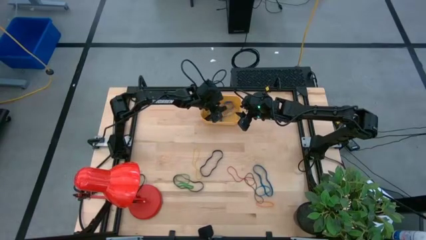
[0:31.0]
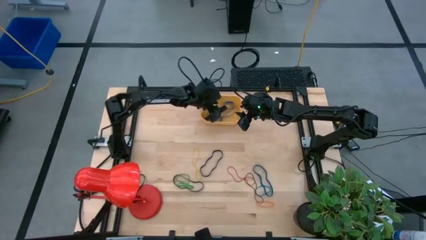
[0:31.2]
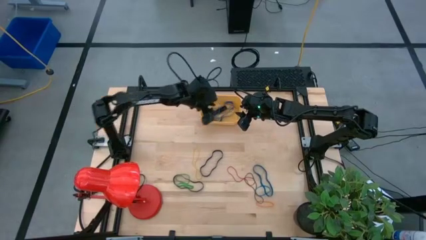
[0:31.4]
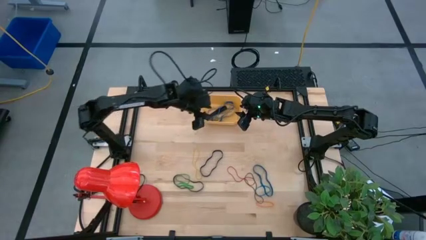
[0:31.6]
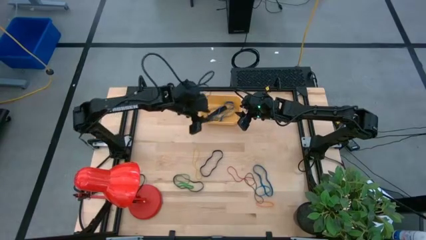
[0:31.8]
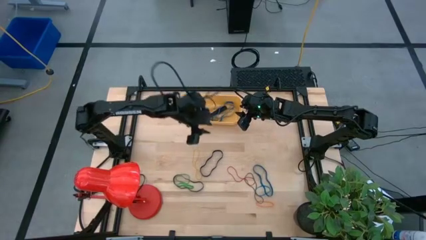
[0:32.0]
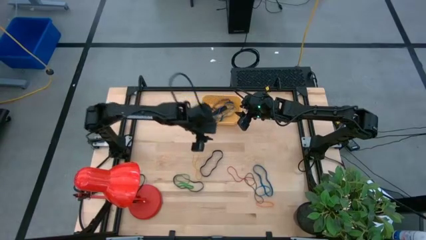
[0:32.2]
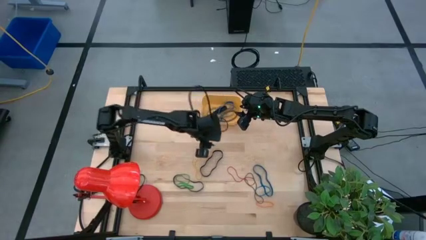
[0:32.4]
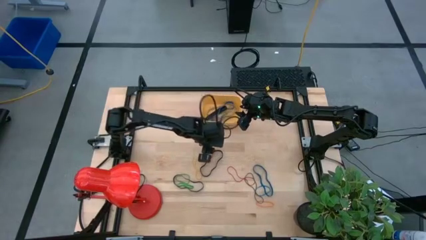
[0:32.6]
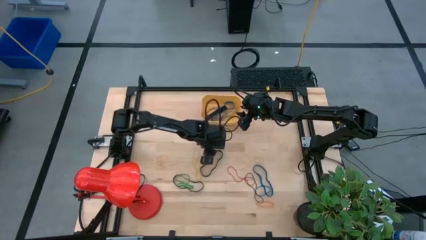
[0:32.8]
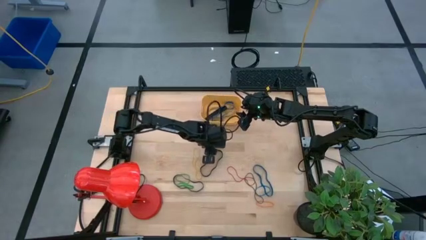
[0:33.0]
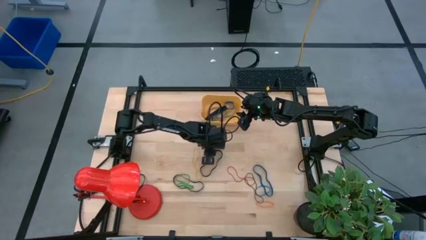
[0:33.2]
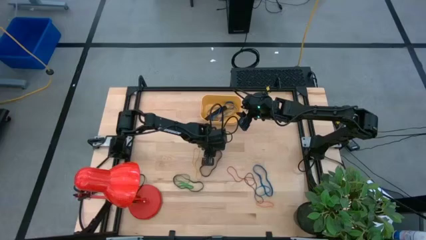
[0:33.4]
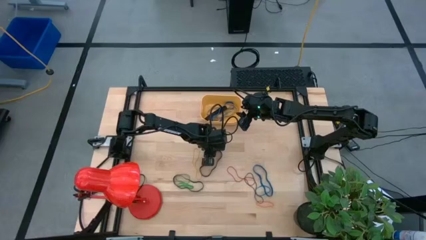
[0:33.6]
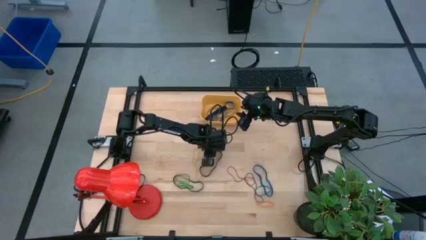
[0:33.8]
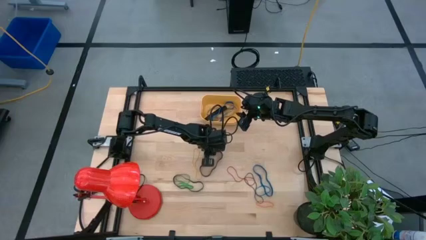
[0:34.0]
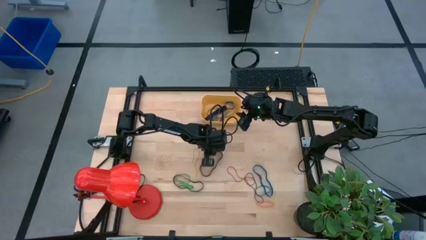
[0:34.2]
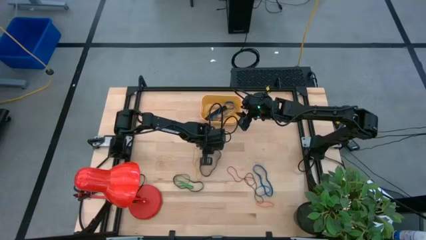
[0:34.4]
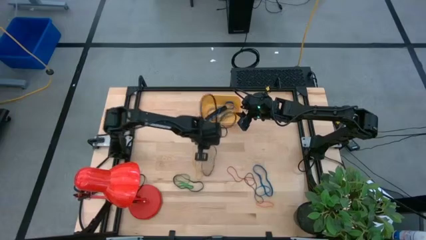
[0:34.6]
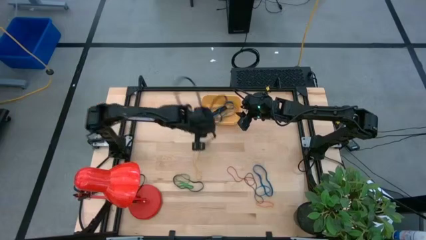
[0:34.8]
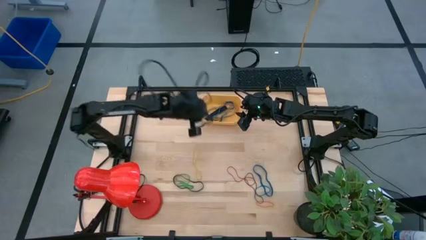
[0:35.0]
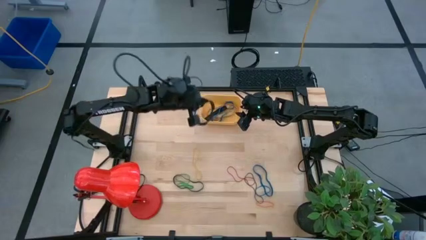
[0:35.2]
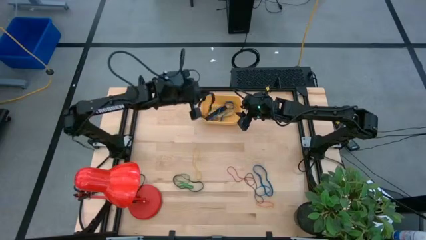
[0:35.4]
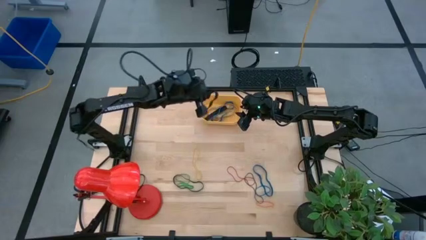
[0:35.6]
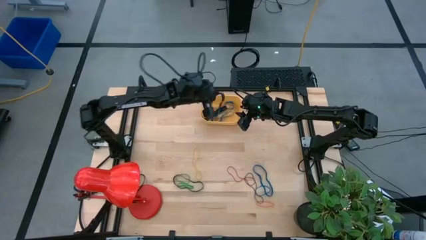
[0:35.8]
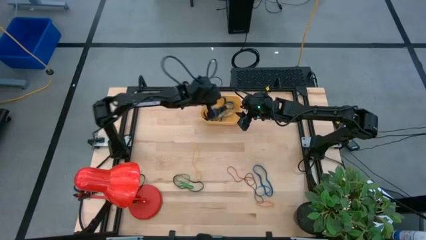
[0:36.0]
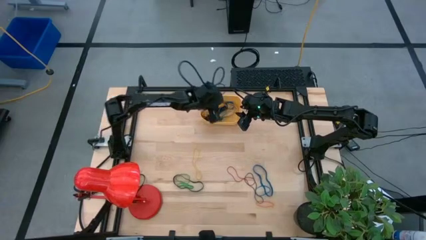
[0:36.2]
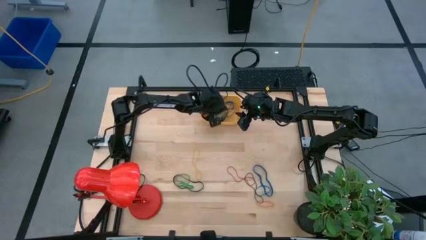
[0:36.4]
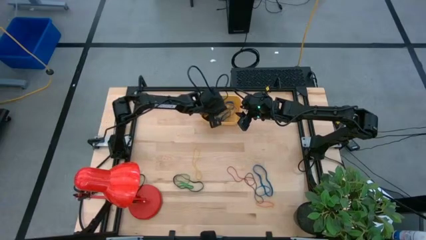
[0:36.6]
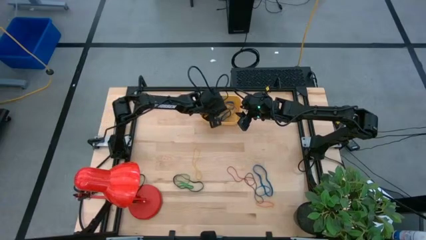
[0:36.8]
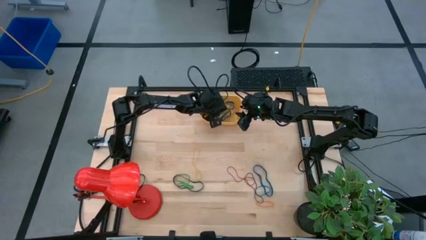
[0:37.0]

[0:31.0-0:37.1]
Task: Pick and place rubber bands into bin
Put the top black rubber band into the yellow bin

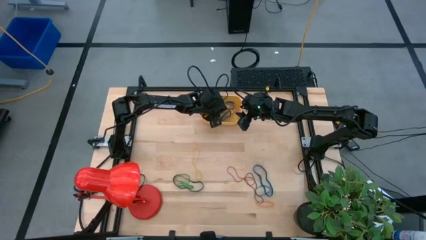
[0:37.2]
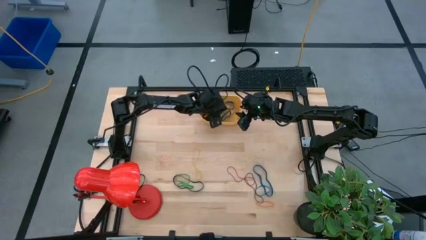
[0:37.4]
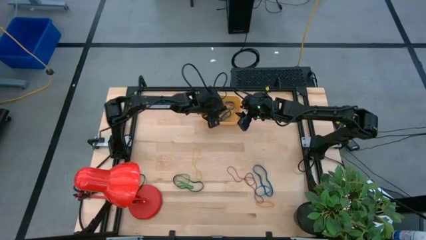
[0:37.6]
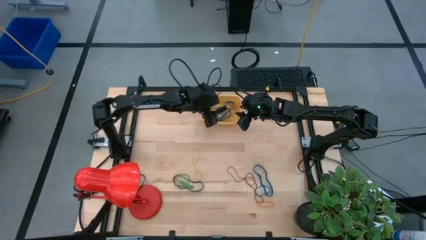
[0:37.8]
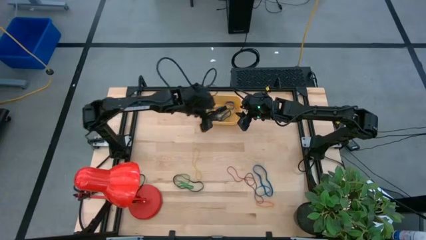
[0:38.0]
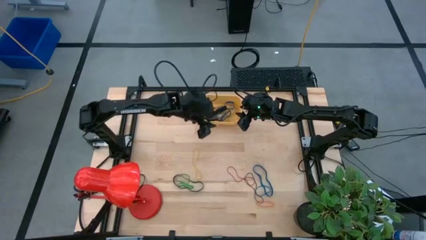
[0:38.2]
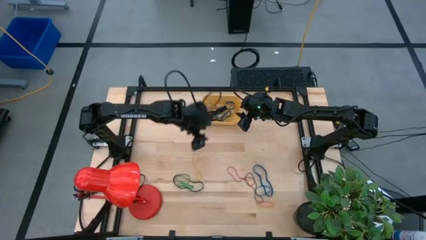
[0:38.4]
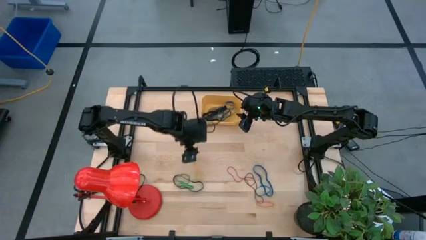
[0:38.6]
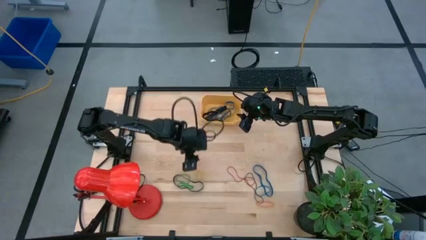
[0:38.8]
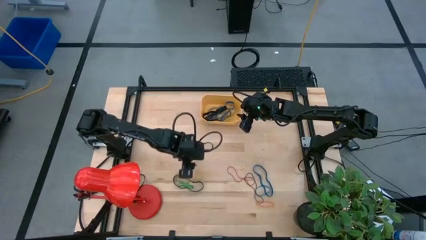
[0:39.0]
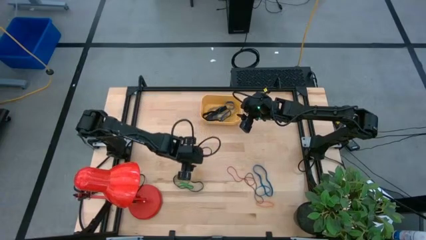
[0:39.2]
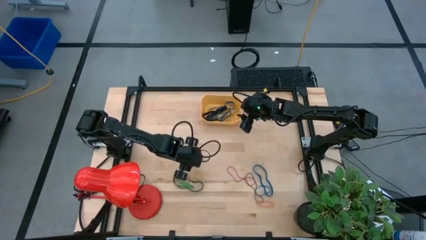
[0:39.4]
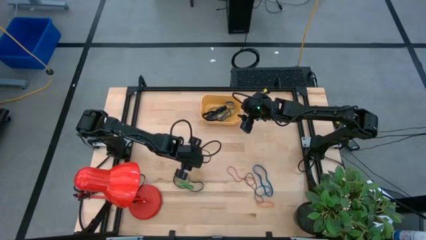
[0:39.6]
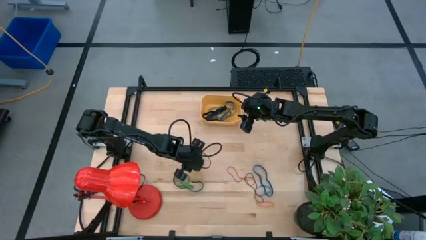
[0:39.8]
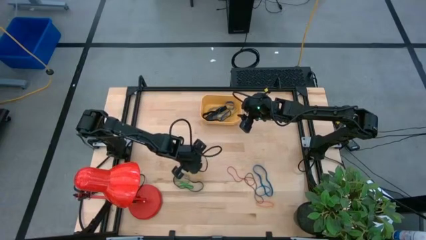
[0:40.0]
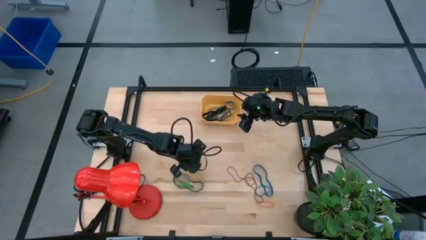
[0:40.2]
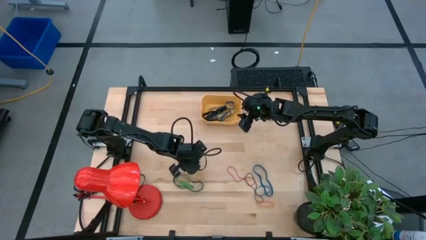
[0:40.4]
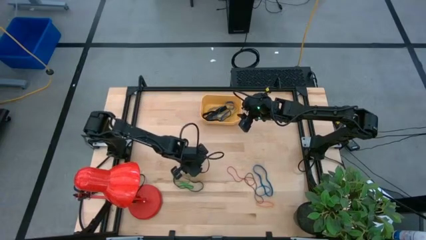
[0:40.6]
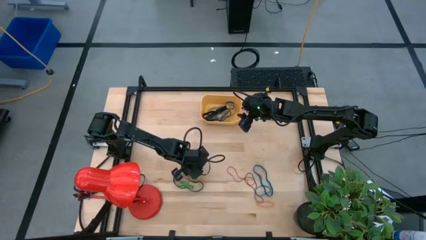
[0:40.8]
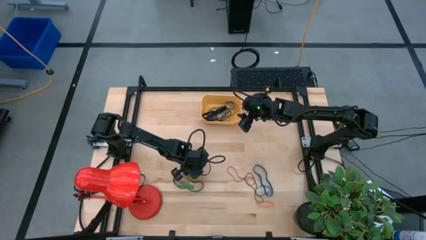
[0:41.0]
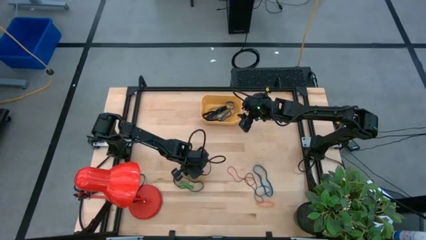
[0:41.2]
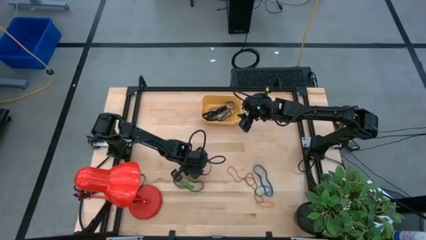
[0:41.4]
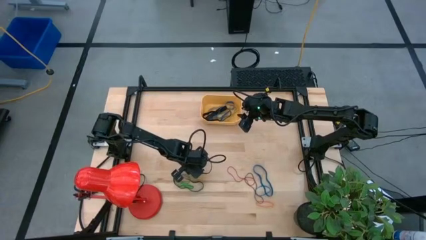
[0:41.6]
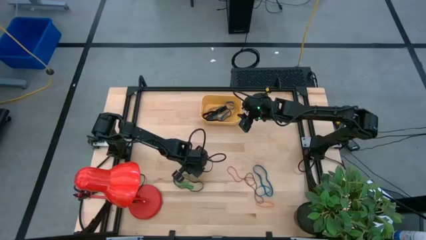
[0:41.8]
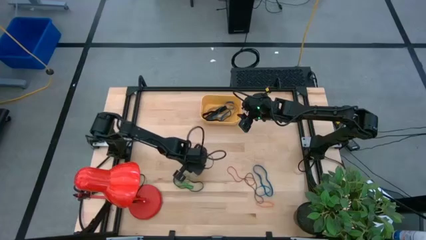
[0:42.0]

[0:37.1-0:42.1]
Put the yellow rubber band into the yellow bin

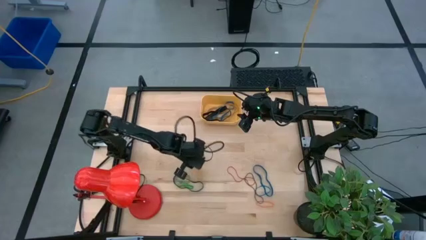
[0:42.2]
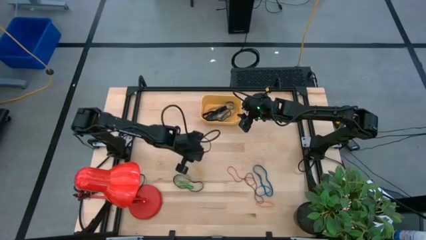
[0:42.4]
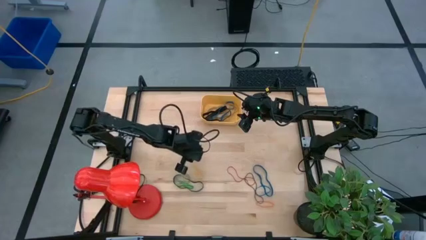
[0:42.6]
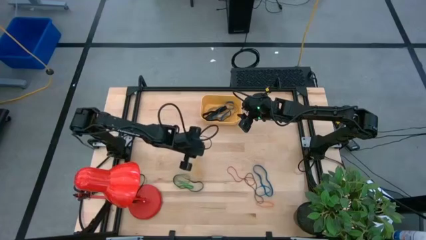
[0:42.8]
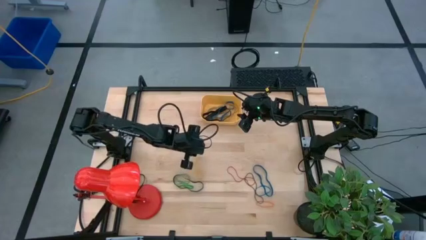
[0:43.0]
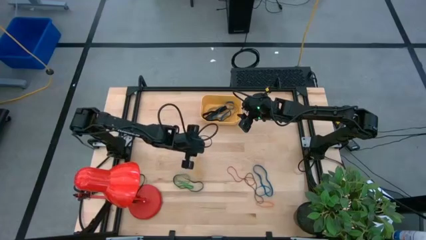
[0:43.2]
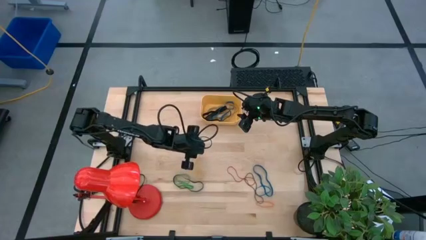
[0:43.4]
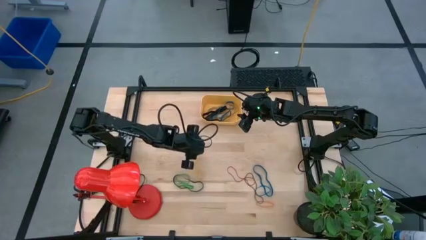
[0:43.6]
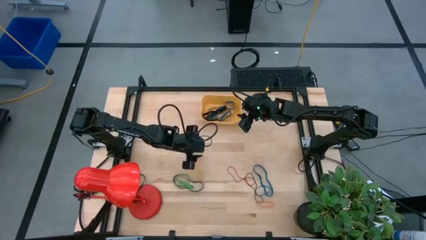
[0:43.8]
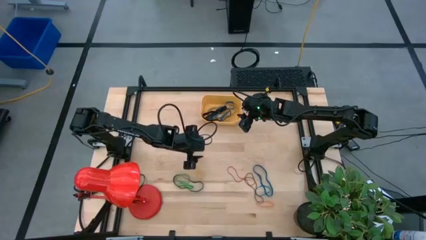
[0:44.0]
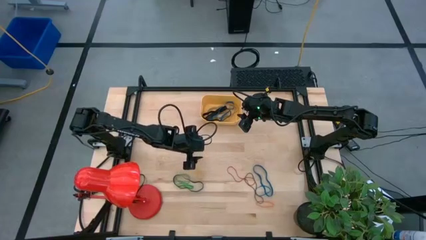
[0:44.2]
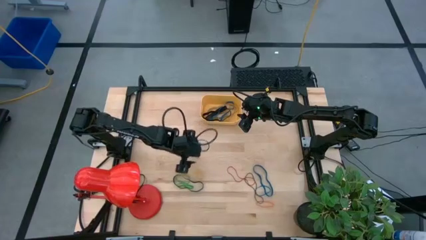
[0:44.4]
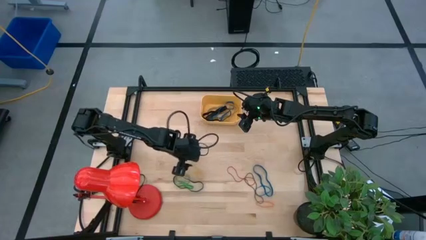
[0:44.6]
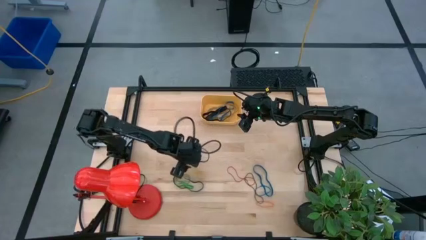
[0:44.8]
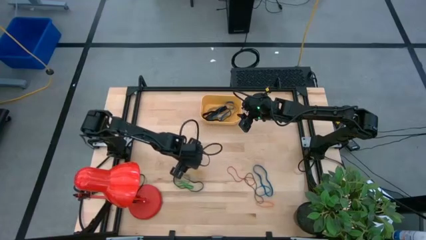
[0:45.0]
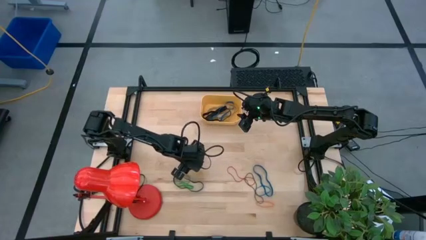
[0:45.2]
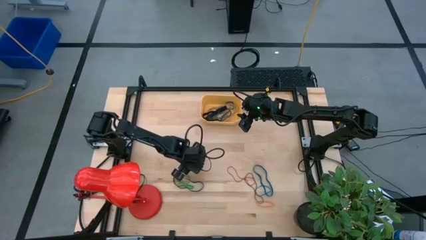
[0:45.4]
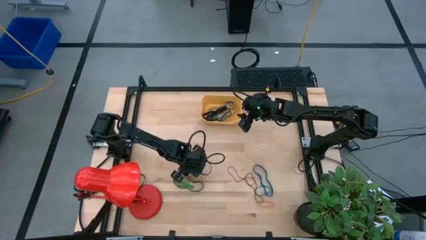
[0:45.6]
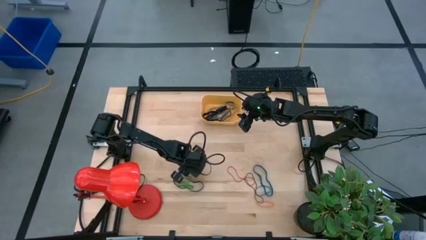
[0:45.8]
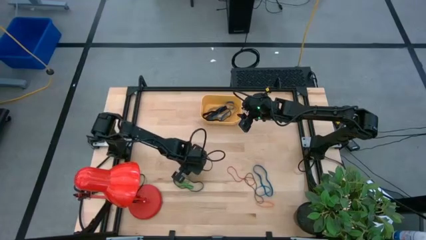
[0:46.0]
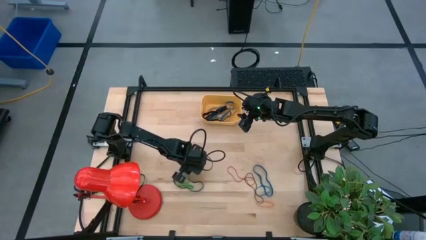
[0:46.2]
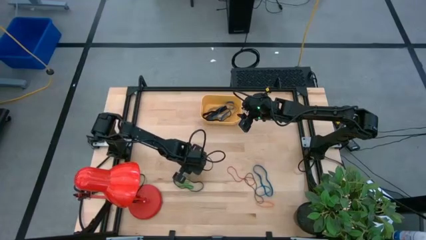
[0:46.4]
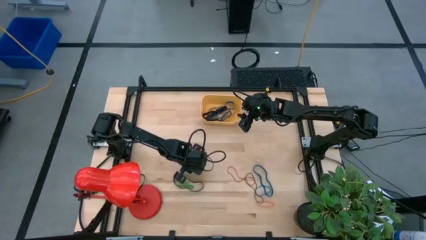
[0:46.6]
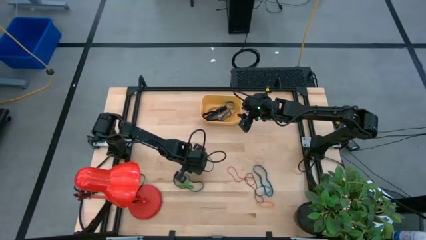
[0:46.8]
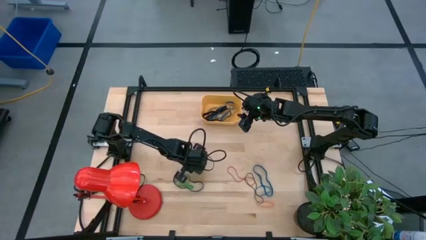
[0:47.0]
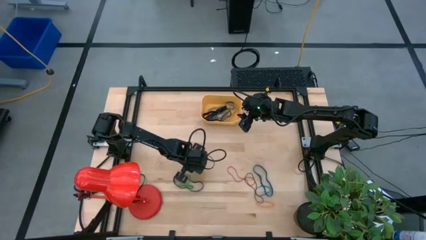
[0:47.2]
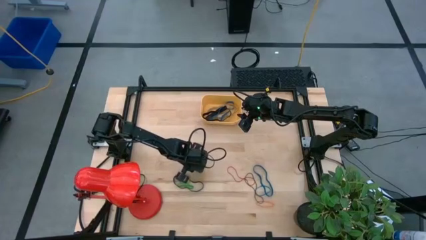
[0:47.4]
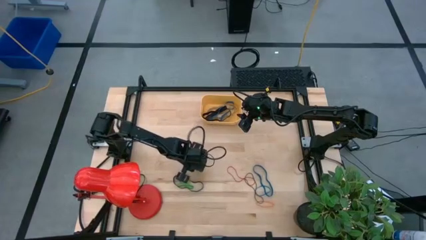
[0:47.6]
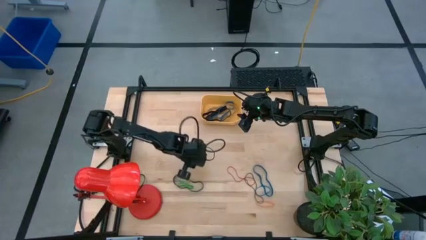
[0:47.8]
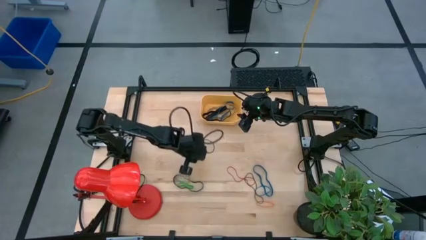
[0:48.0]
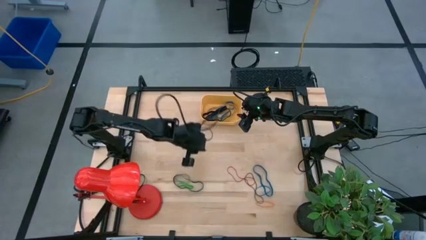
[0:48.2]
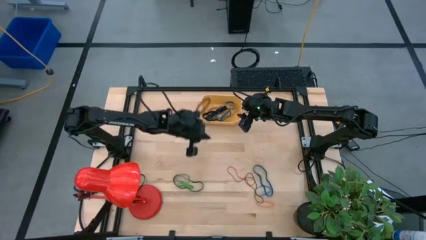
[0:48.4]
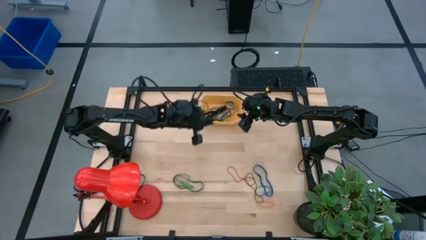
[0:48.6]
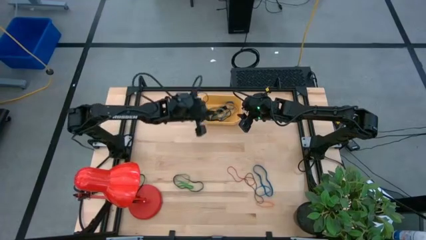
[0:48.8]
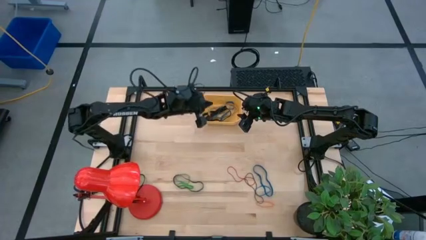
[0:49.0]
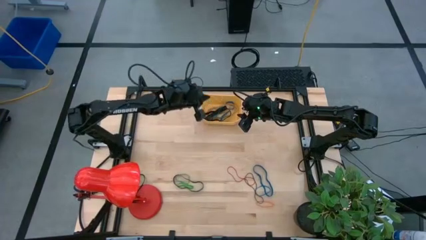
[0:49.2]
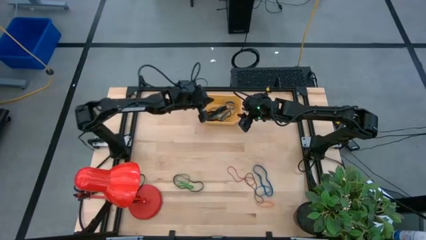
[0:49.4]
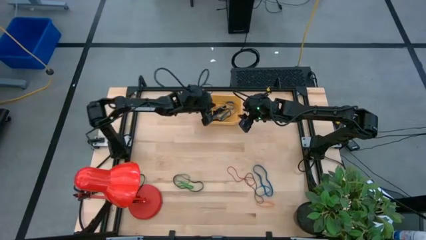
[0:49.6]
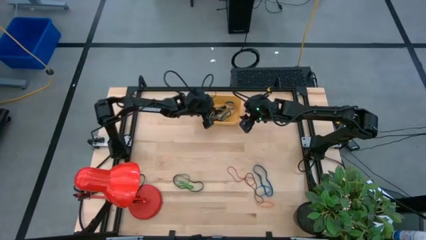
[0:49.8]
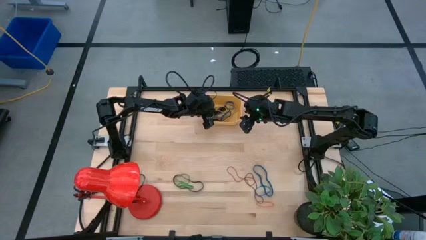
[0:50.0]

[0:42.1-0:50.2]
Put the yellow rubber band into the yellow bin
